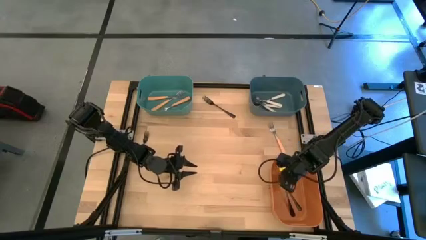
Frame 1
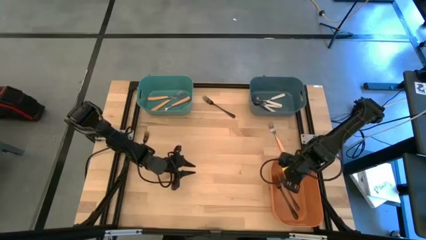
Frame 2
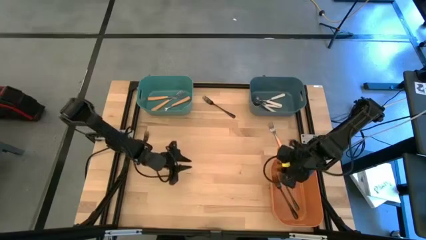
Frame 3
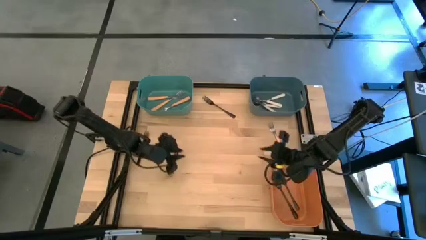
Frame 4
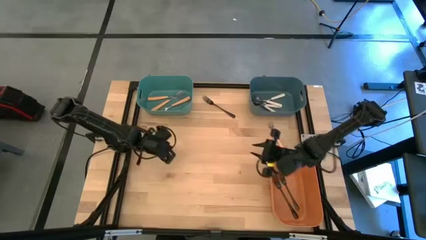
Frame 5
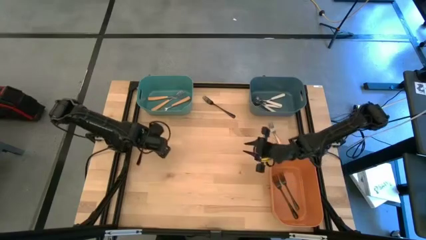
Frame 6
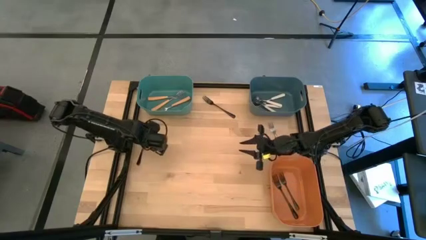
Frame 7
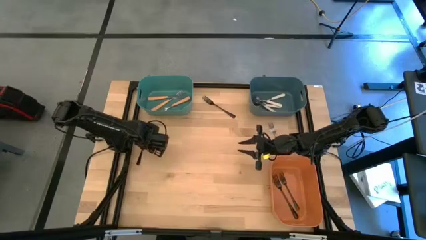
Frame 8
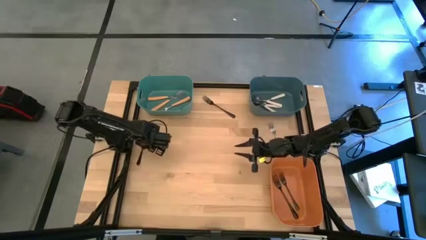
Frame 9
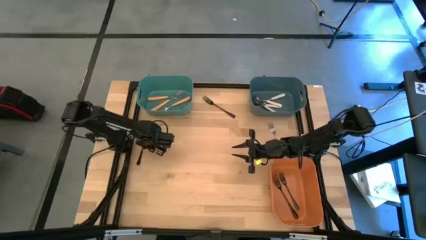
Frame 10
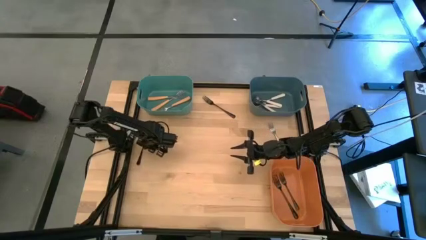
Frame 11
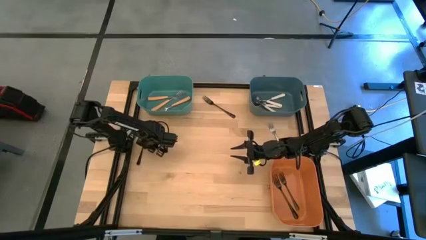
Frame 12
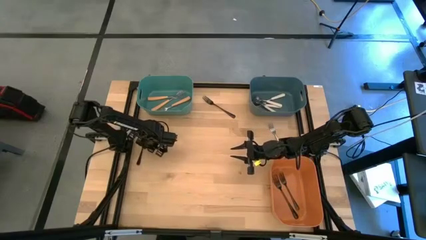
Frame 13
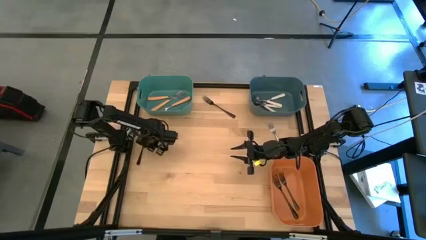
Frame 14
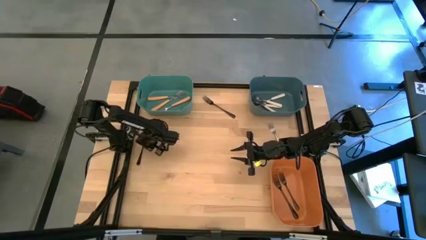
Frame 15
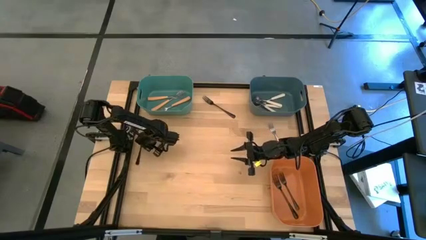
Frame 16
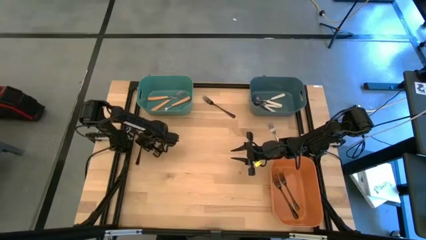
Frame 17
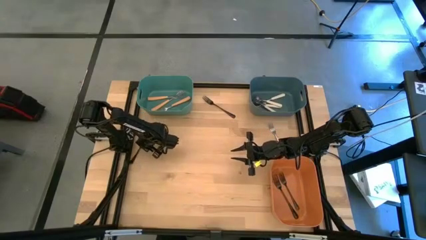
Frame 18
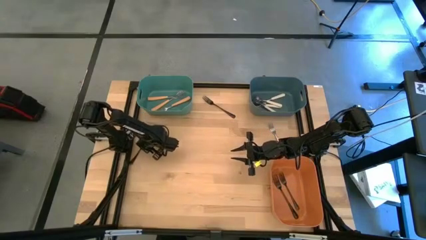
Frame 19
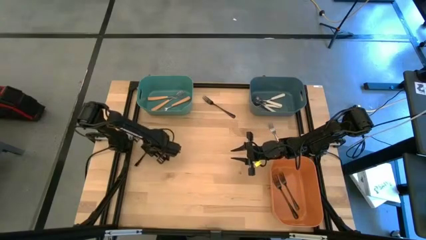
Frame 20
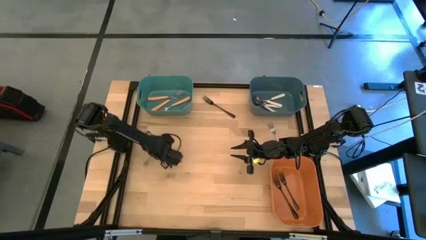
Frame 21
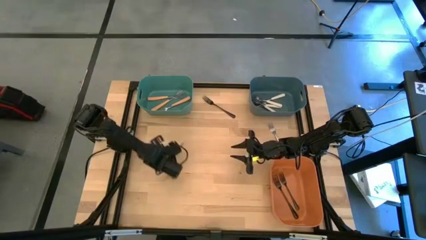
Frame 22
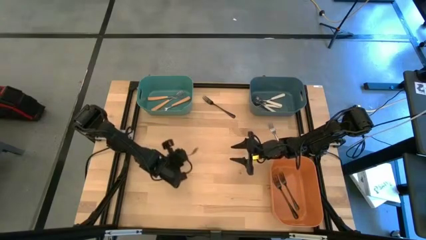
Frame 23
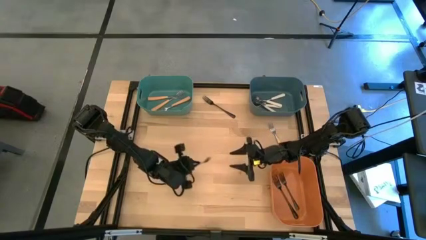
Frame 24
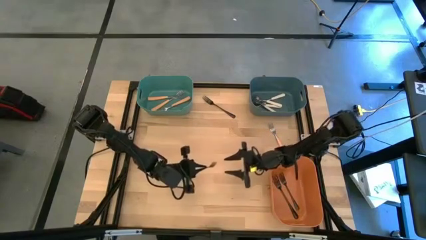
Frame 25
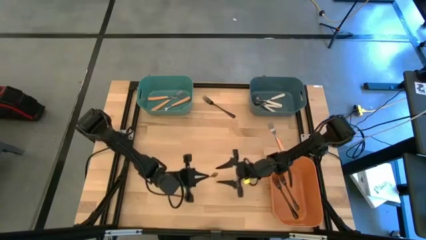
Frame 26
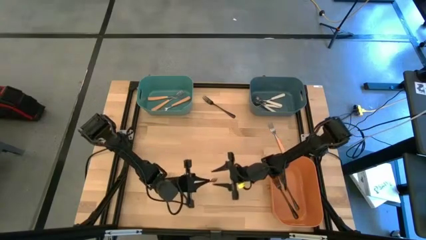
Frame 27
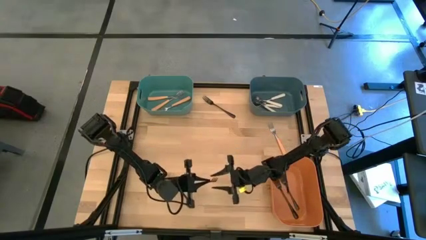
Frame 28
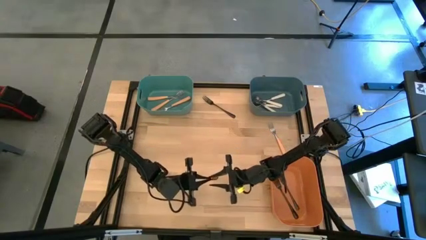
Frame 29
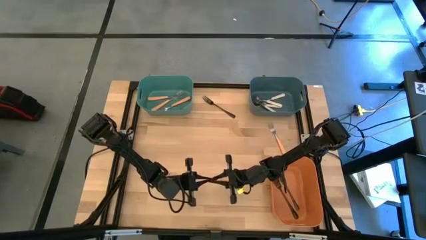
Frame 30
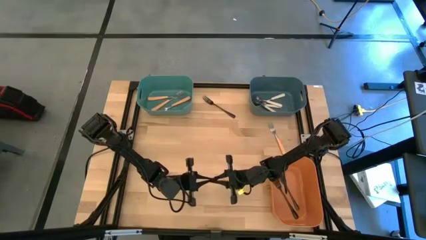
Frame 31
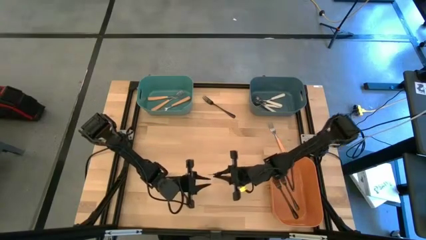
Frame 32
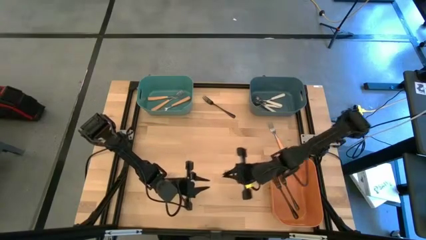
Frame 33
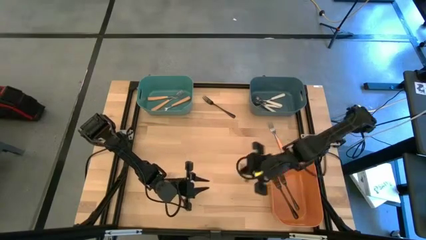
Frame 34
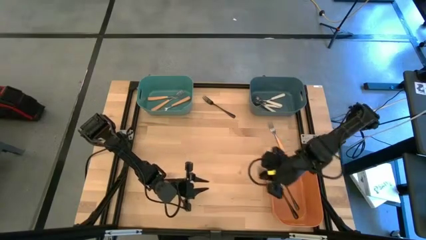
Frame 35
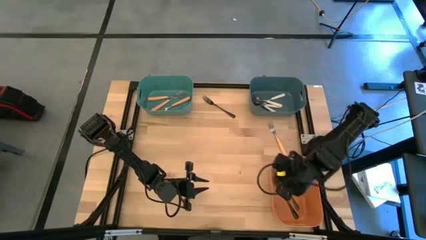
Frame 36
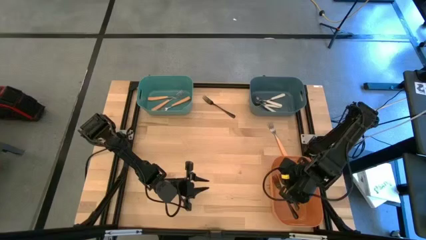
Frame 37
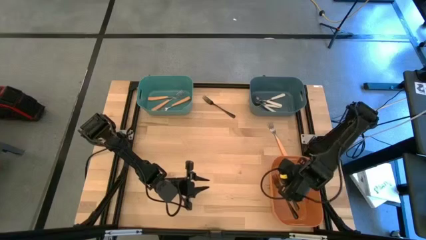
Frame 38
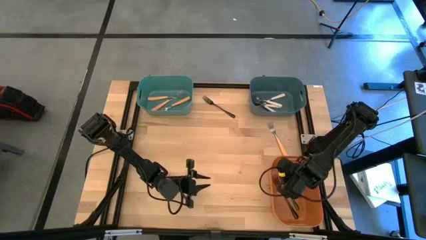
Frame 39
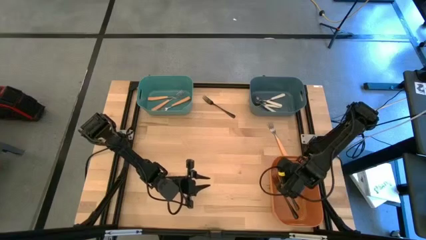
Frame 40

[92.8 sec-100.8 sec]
Task: Sort silverware by color (type)
Put the black fork into the orange bin

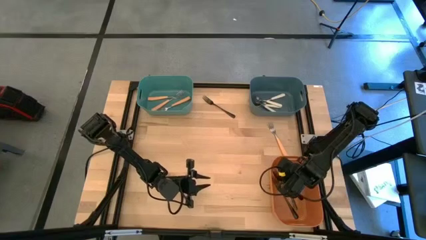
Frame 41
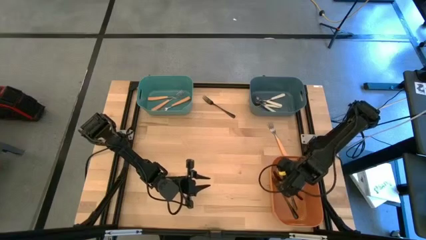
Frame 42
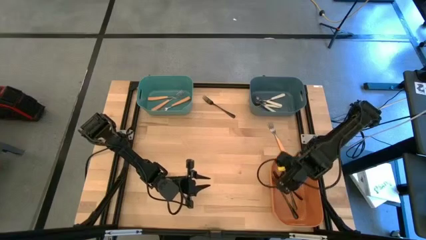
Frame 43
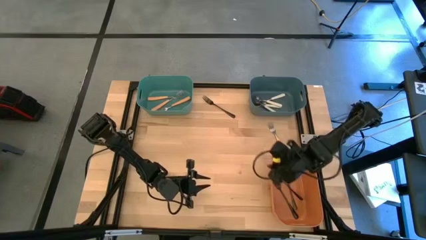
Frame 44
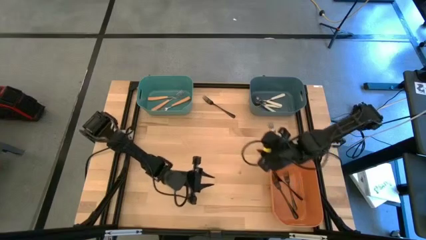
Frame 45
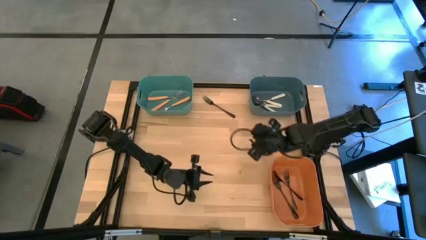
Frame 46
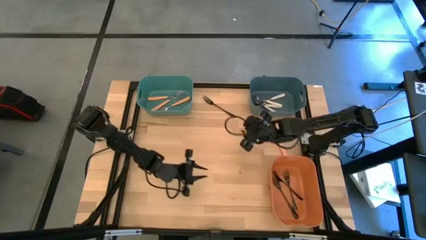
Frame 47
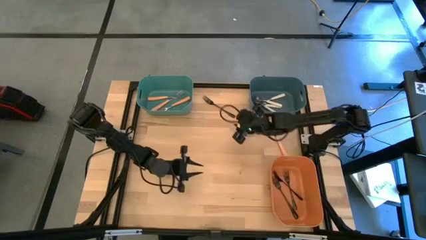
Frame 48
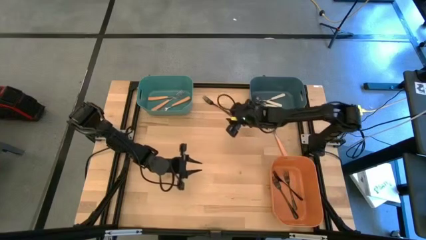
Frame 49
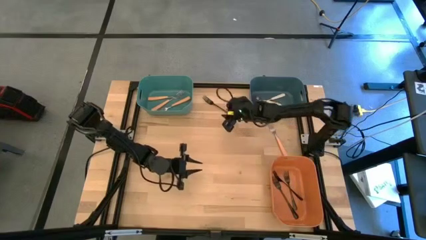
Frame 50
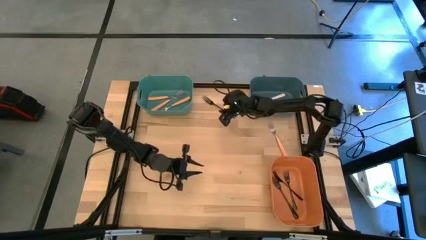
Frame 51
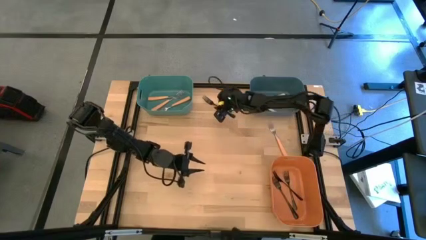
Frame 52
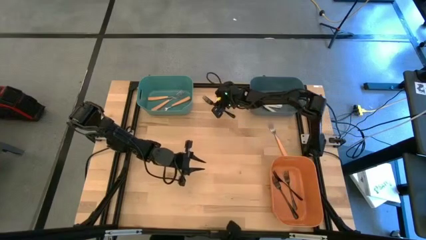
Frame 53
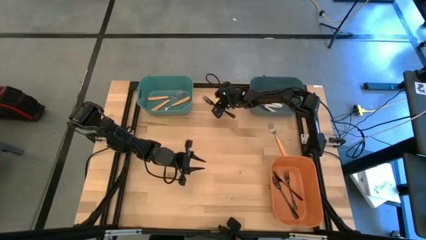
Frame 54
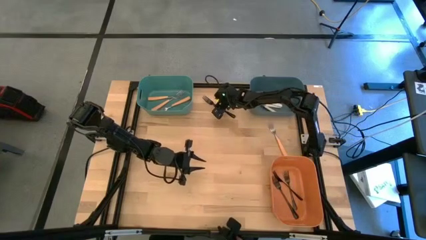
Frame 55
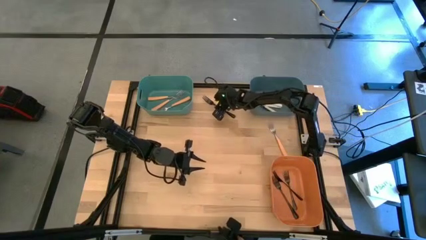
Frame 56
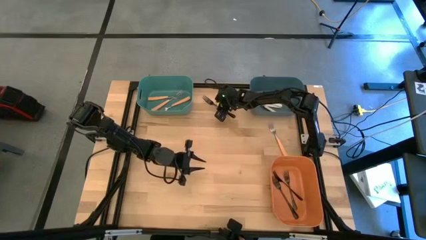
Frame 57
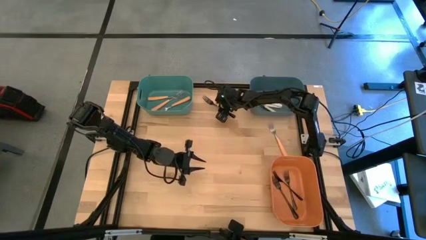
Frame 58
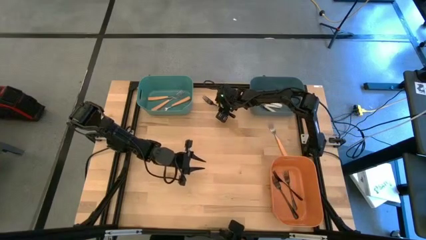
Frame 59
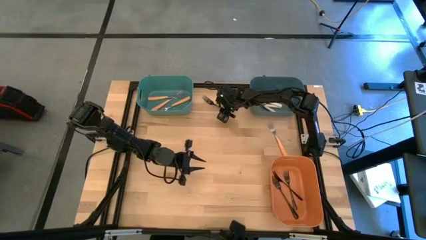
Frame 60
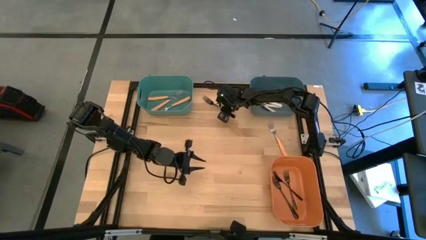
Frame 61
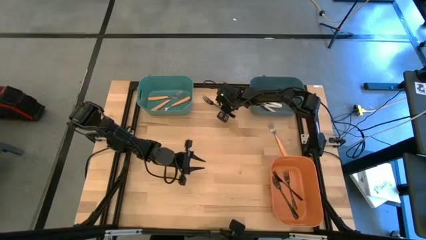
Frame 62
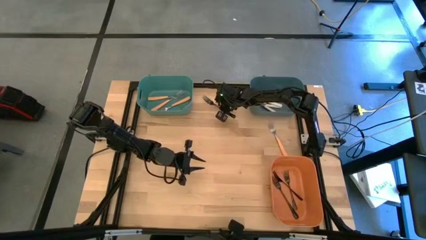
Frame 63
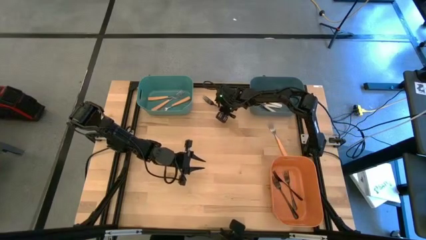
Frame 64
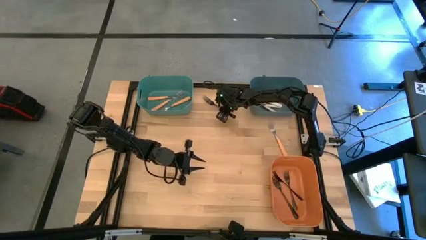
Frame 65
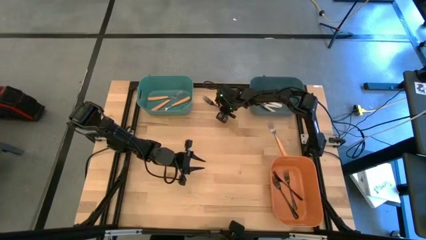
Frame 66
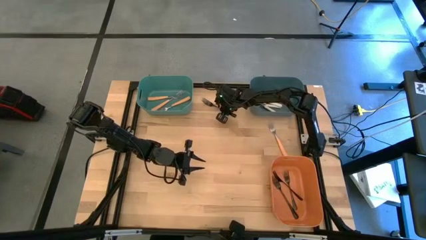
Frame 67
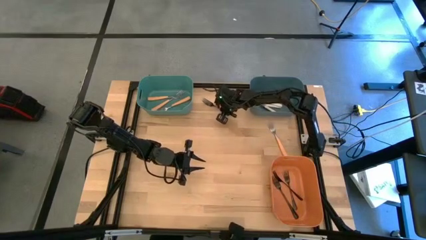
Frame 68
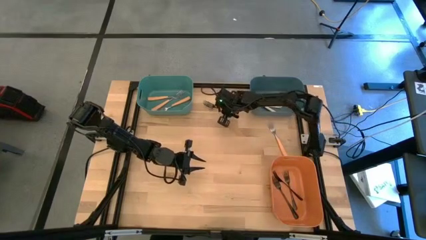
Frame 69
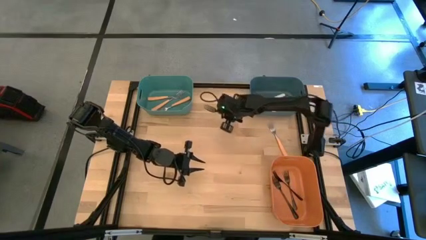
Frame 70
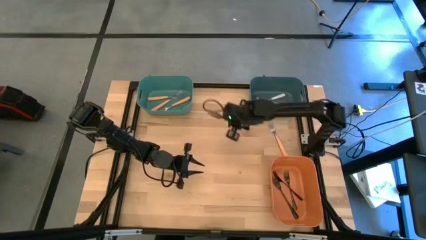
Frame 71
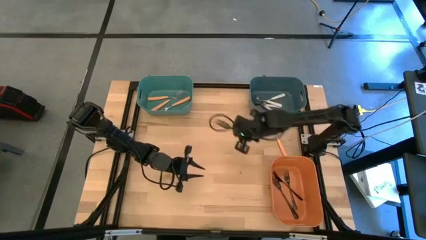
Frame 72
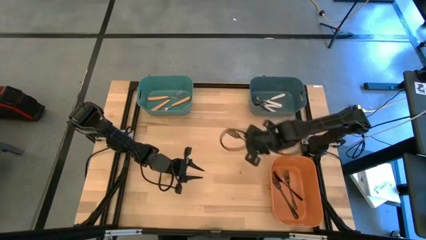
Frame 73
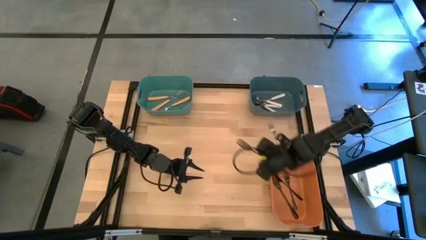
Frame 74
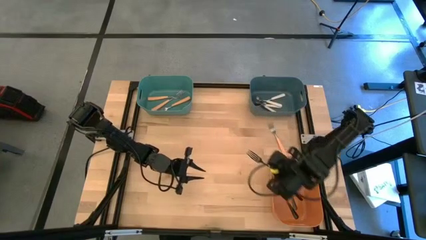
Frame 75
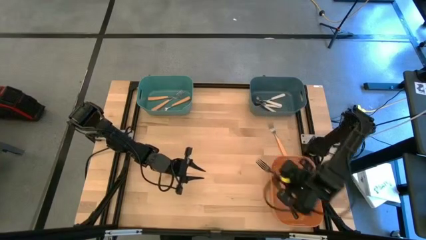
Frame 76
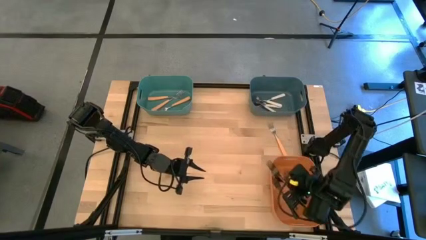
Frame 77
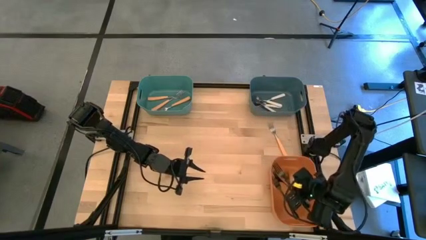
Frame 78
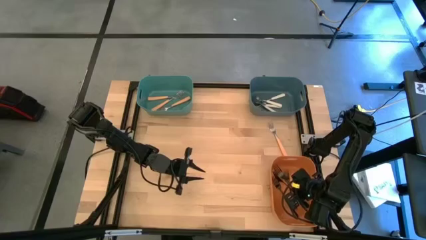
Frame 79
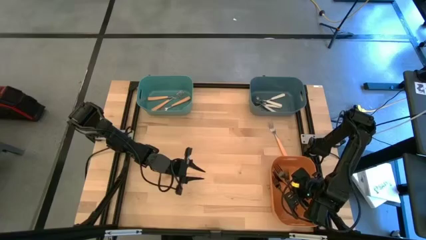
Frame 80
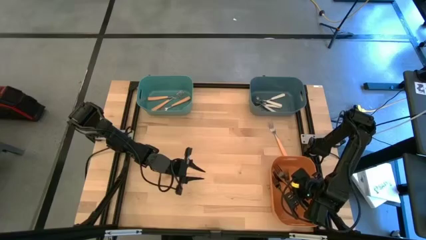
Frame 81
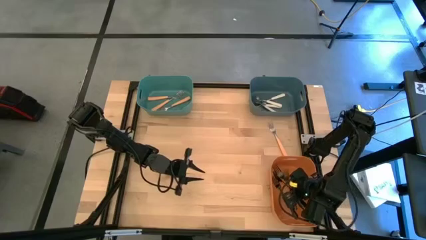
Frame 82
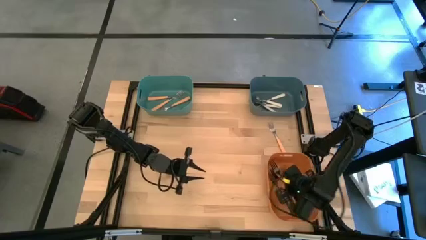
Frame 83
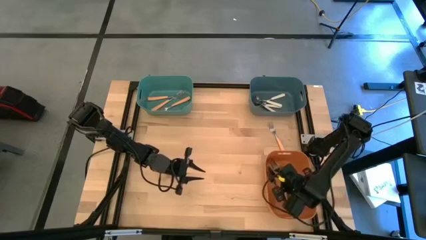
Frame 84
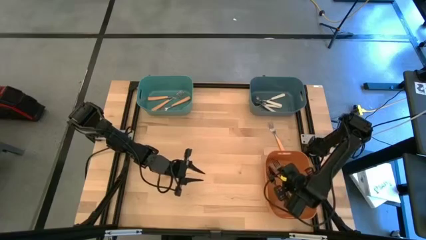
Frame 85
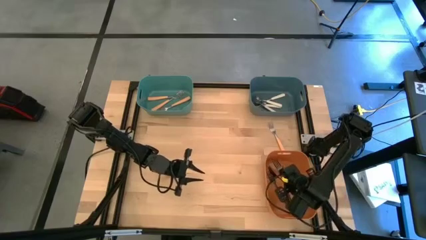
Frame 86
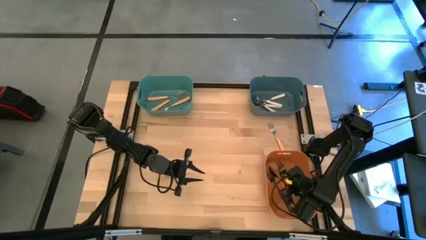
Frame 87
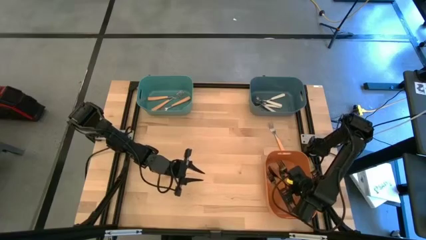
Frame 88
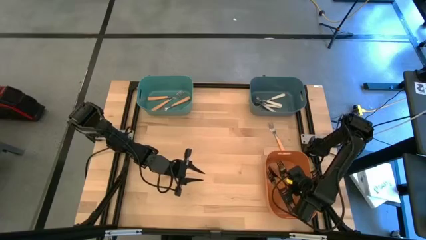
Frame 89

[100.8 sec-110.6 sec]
Put the black fork into the orange bin
